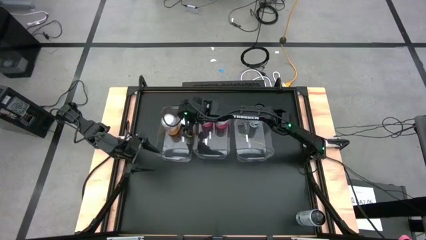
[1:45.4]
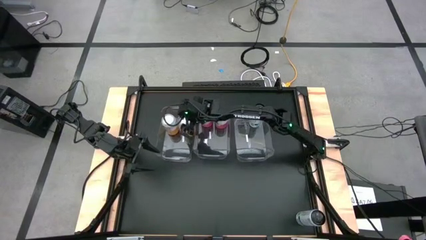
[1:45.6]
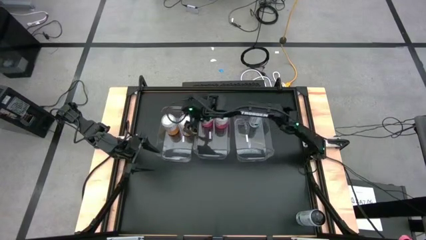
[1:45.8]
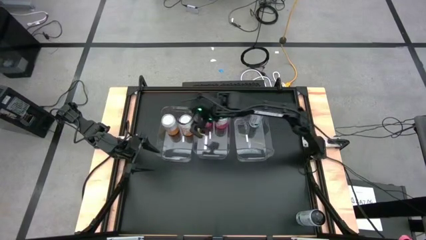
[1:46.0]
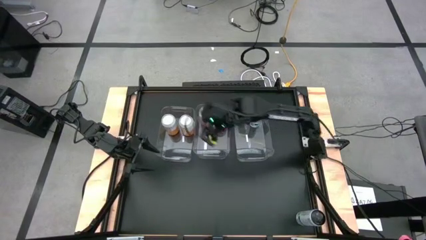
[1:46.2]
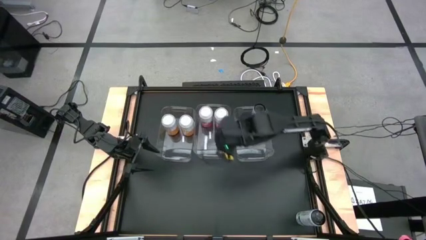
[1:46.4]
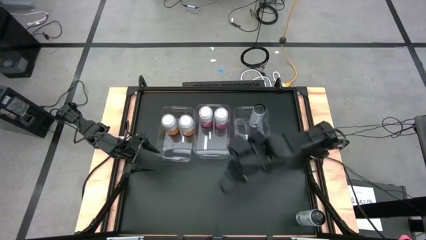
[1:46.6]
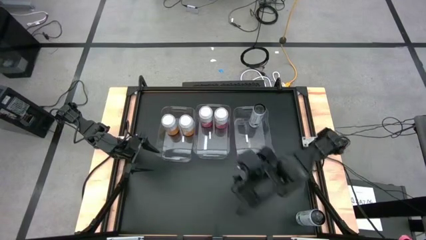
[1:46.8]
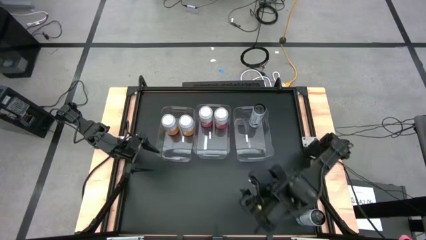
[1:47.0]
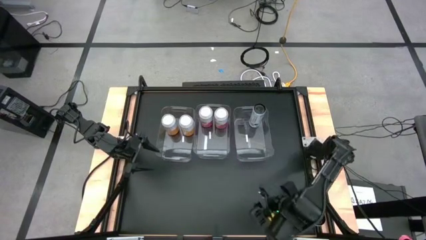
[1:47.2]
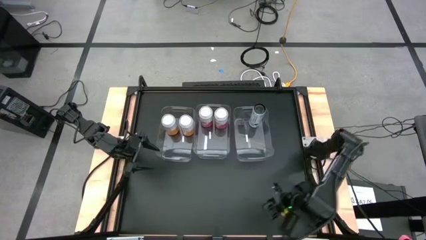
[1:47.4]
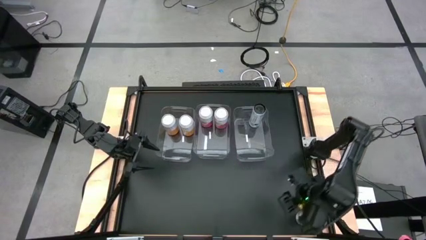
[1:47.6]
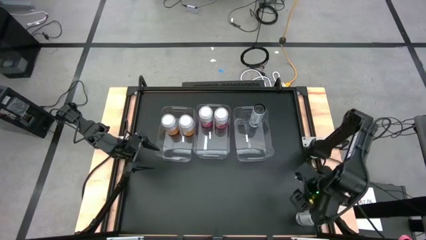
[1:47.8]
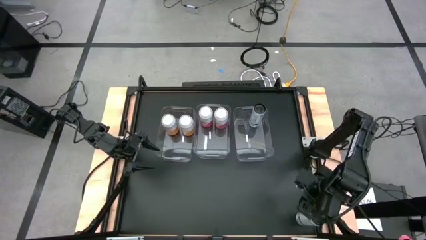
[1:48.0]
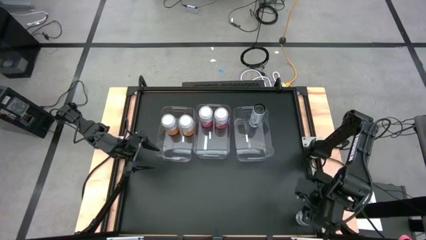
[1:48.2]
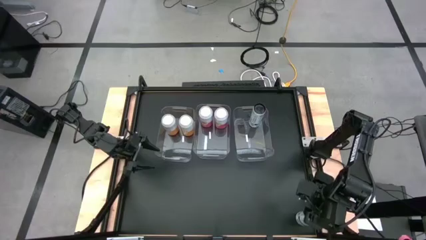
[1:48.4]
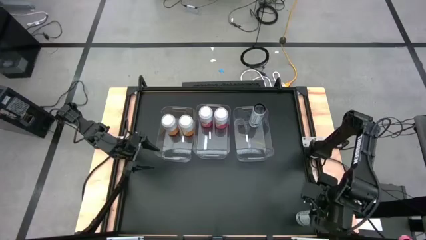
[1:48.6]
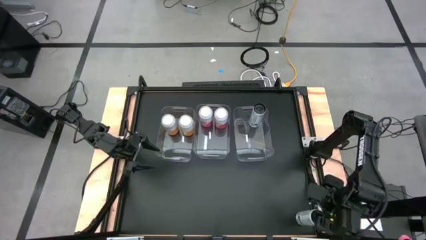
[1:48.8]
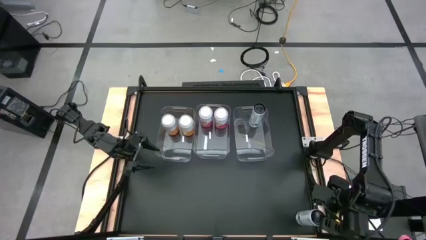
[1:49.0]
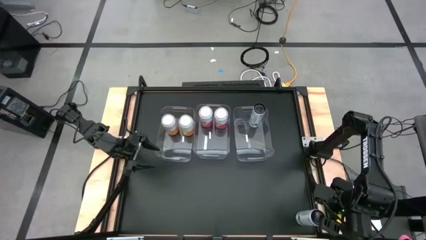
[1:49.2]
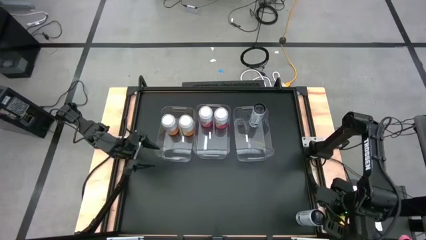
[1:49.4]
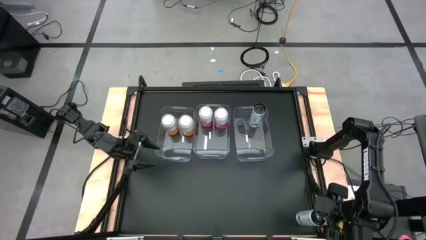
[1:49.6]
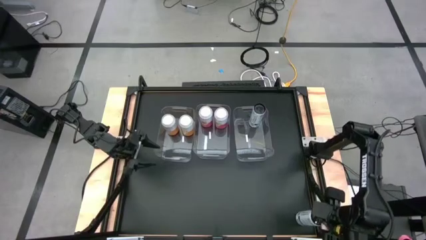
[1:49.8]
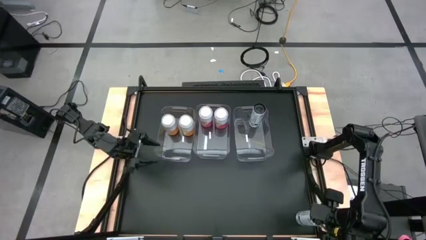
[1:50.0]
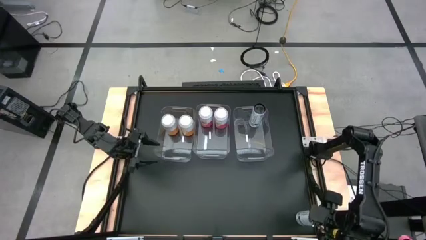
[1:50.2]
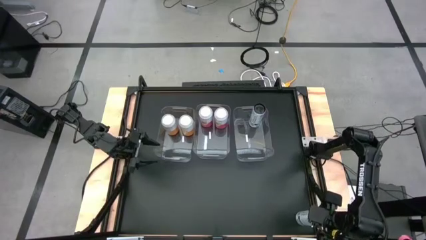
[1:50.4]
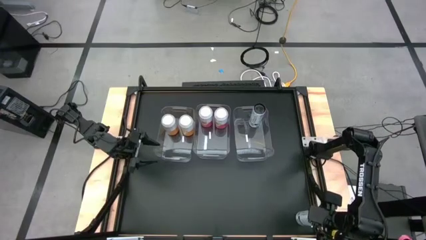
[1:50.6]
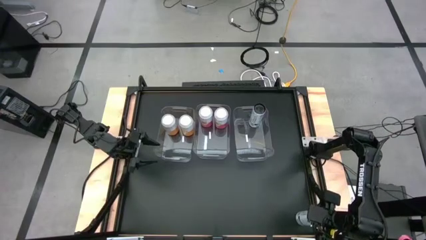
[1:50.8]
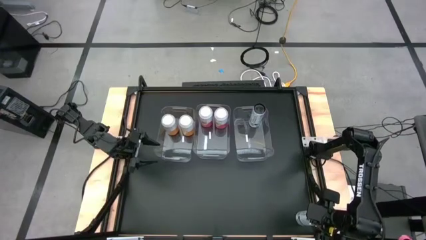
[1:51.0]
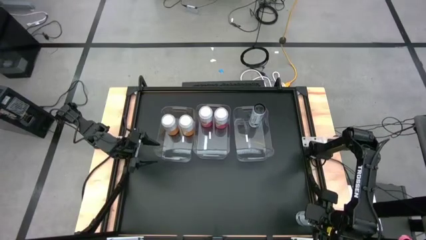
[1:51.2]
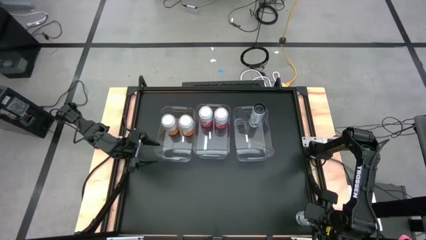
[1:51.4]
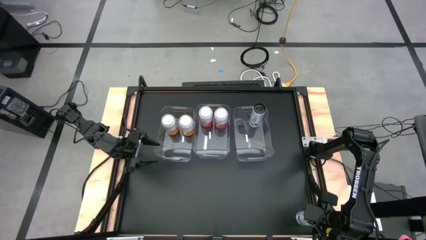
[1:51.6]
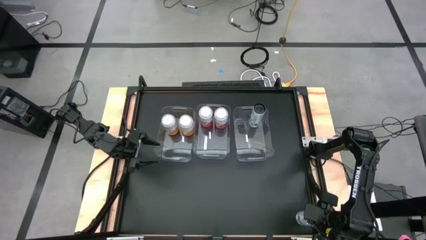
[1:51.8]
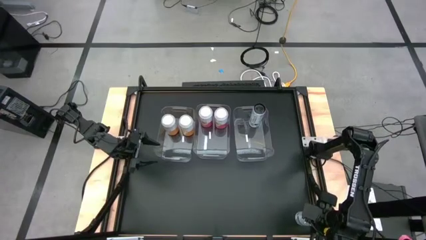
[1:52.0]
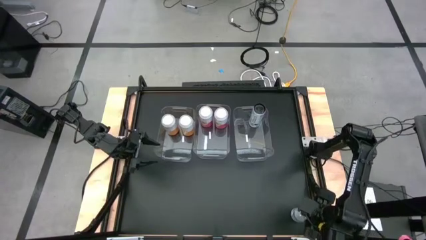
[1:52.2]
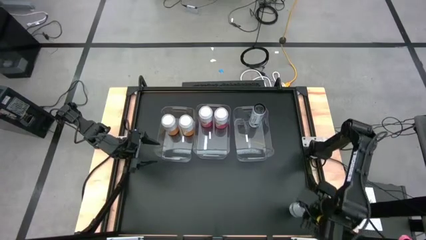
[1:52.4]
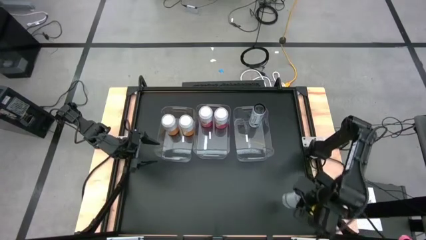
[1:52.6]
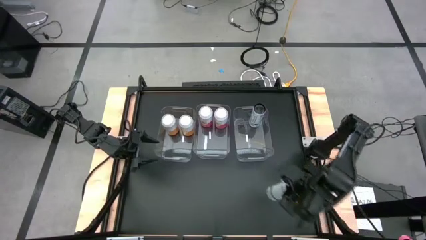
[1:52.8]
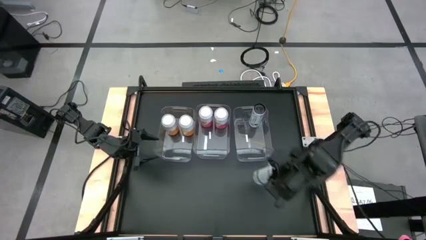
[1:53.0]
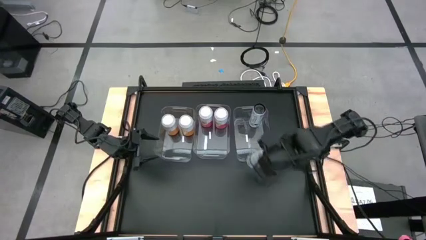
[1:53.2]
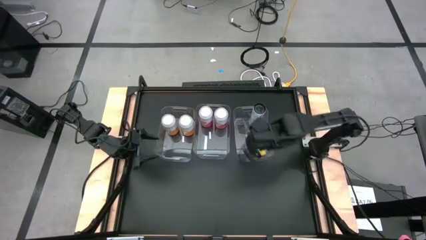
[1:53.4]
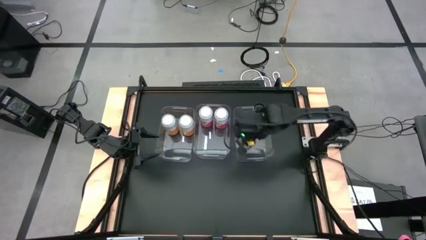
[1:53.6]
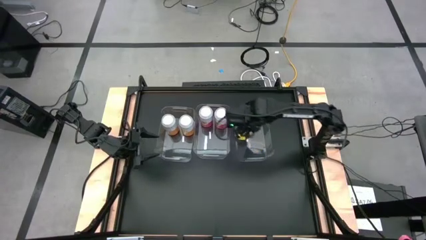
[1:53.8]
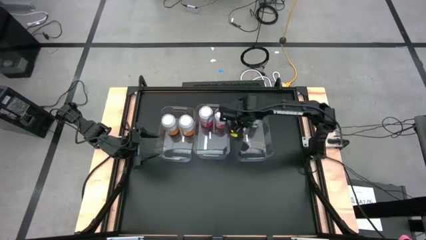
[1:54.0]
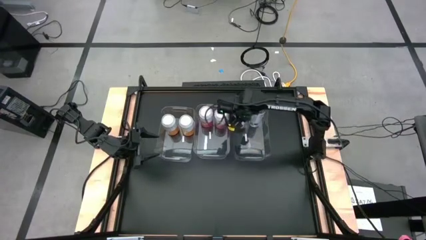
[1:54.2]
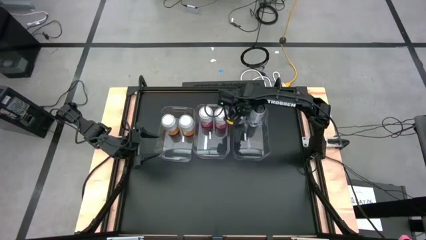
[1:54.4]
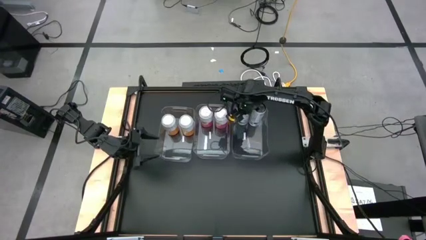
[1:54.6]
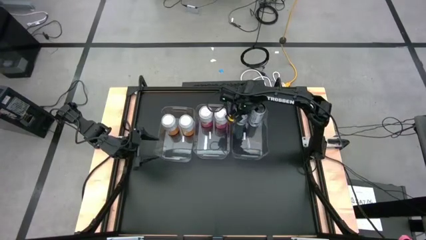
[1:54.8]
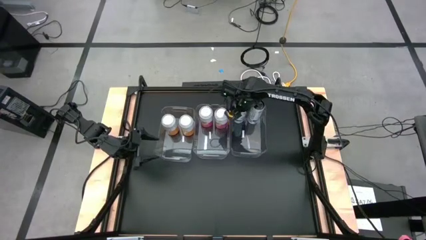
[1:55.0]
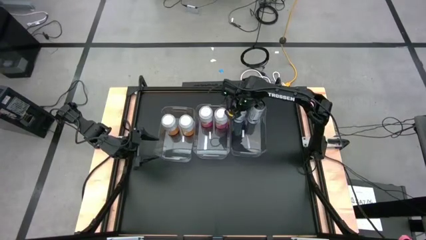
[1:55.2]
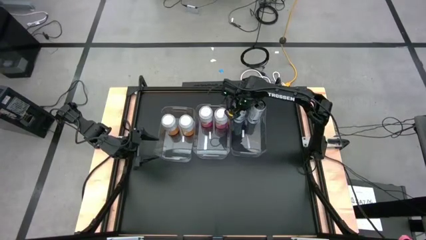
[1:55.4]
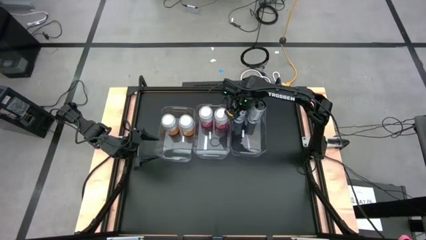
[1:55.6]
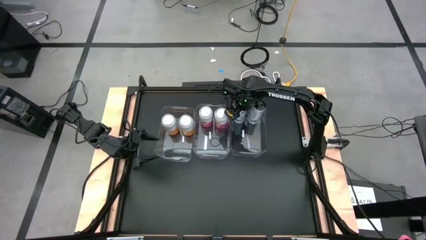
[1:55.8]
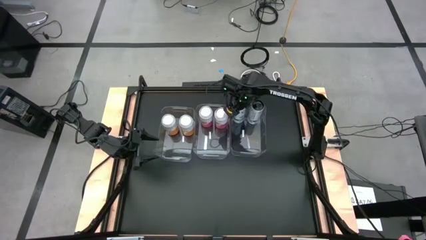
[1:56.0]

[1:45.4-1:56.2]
Task: Sort soda cans
Put the white-blue soda can into the right transparent bin

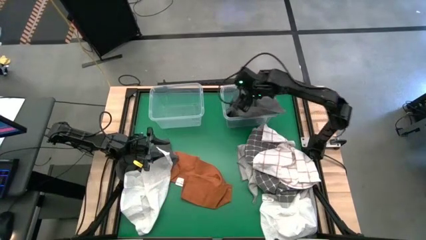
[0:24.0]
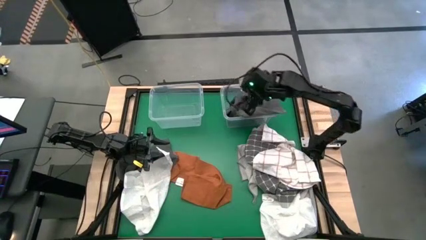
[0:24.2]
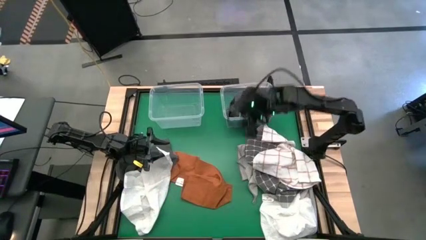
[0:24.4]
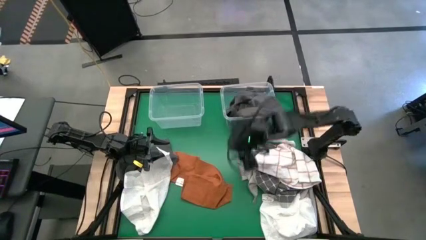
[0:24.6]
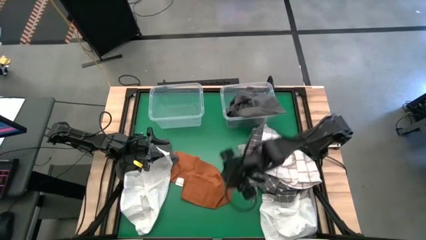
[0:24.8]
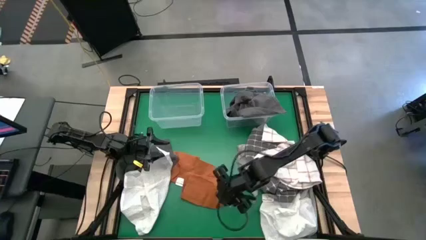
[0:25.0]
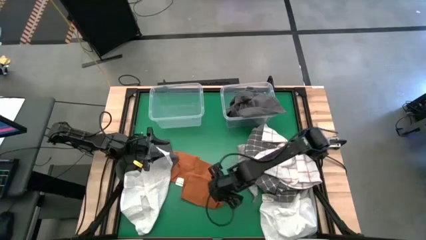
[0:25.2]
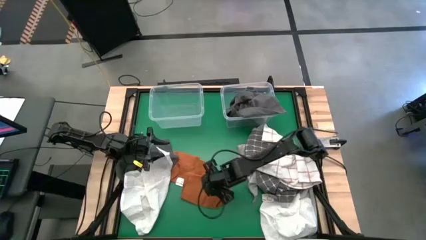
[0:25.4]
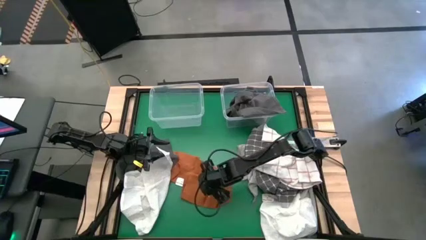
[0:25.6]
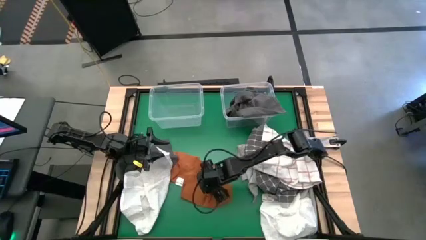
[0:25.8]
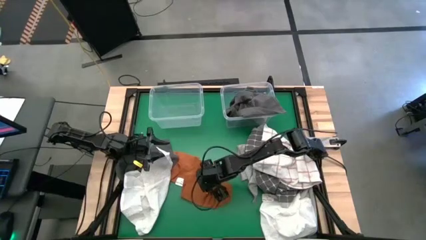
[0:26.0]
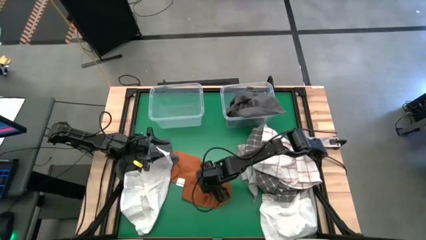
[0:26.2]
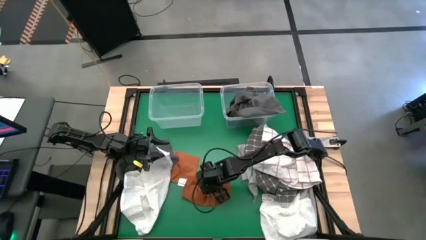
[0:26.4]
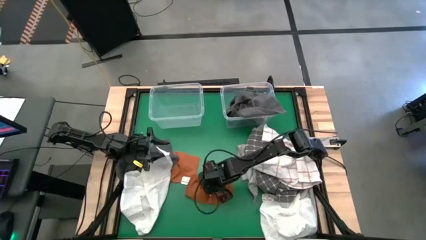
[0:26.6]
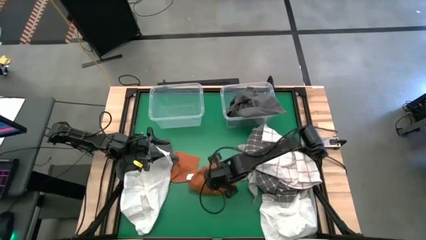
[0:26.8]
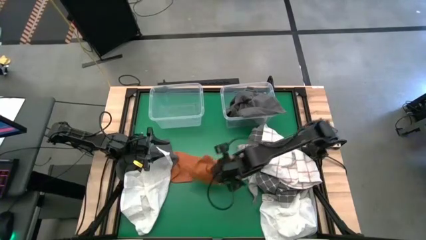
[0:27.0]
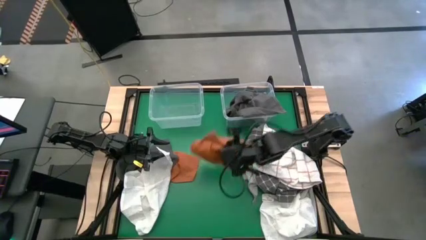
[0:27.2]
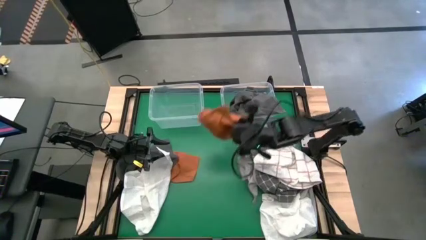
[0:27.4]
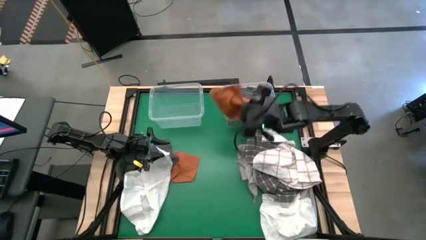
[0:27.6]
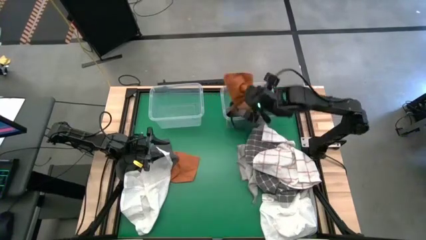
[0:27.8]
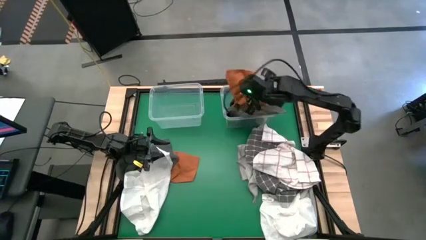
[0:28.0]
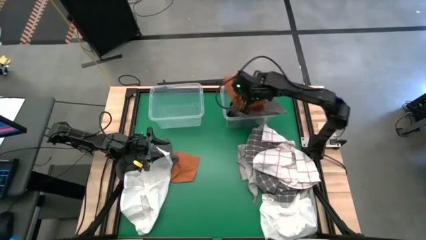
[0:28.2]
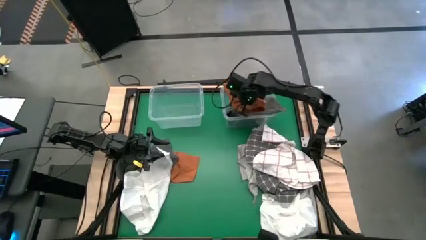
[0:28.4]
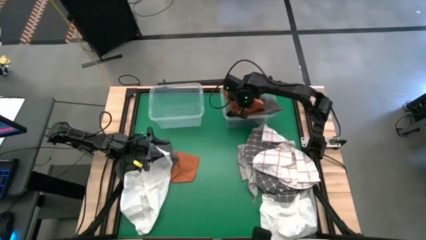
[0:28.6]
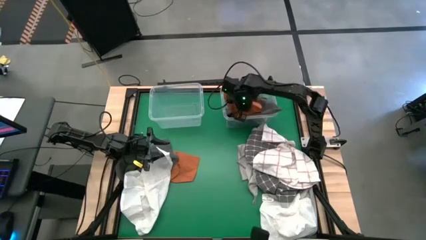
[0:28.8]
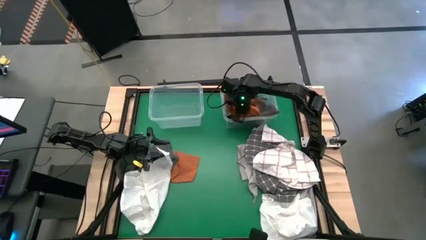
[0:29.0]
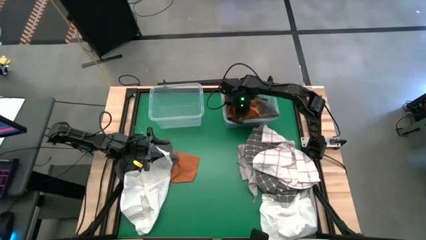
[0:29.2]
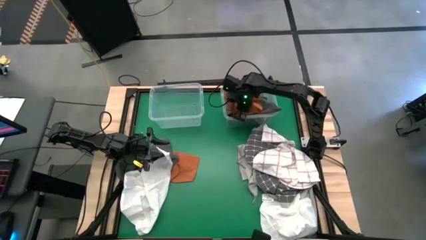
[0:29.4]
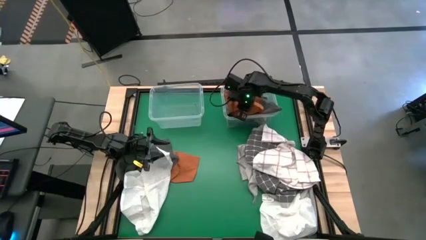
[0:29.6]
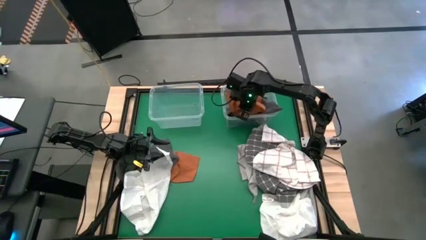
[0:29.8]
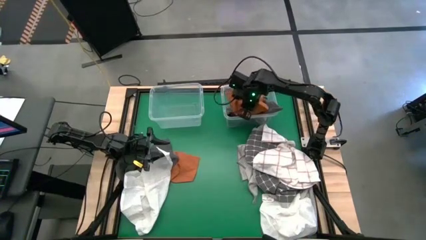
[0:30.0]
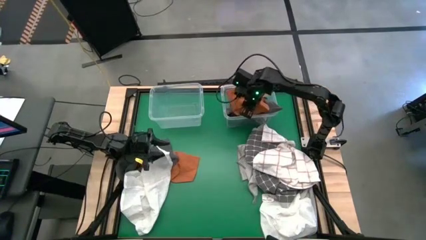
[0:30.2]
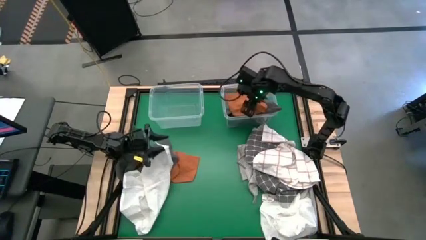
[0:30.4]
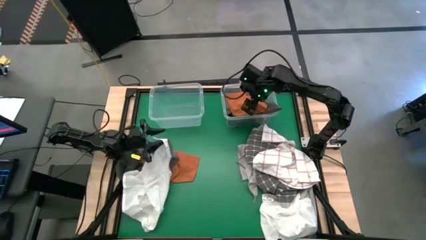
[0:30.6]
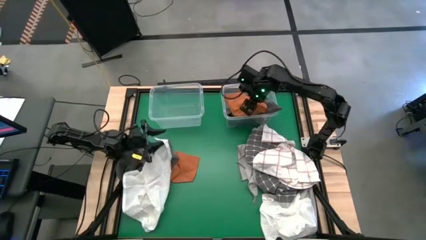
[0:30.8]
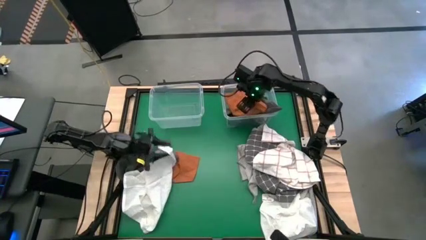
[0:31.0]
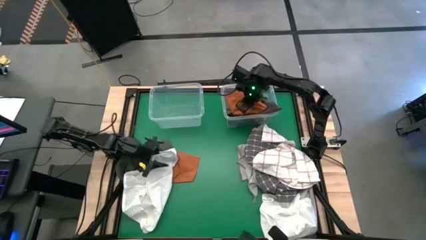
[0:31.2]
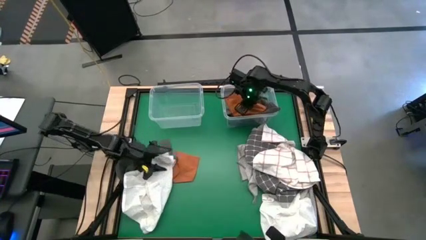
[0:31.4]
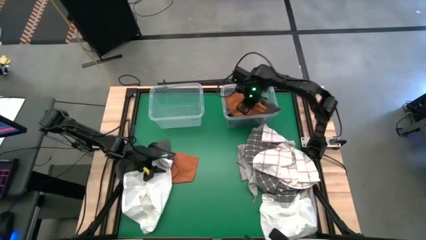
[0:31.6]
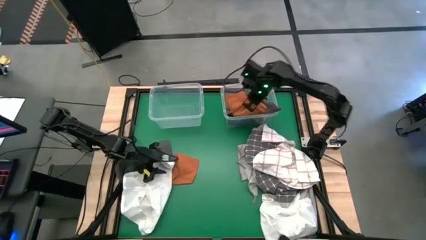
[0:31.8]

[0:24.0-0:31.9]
Task: Sort towels by color in basket
Put the right orange towel into the right transparent bin
